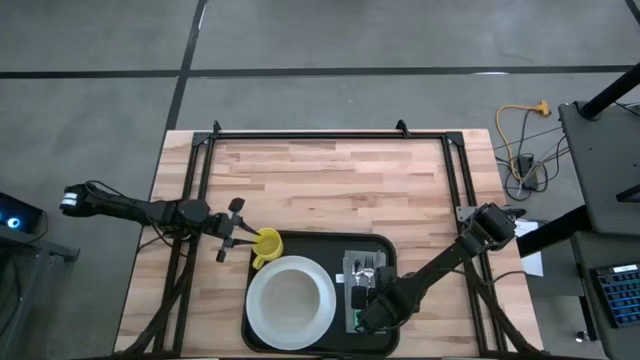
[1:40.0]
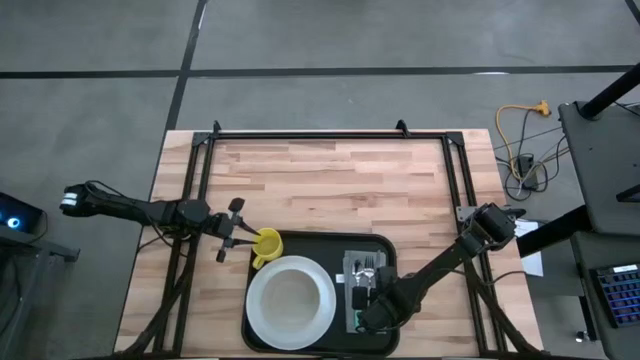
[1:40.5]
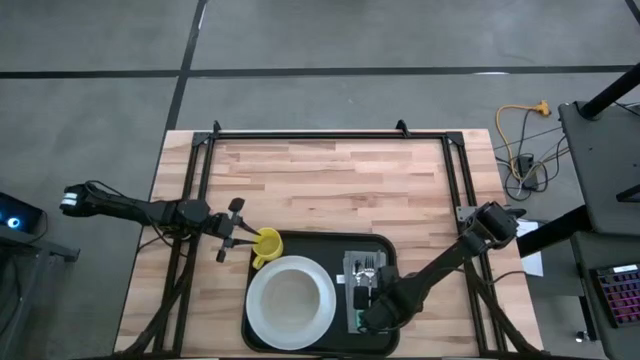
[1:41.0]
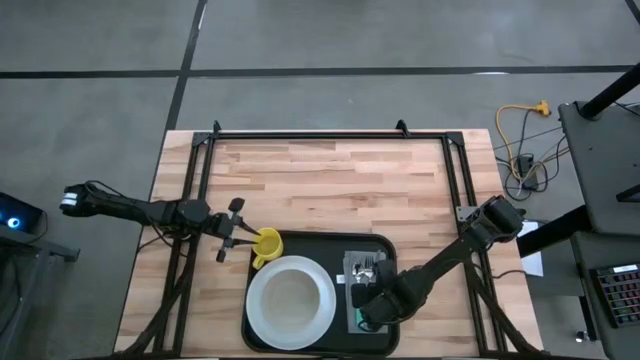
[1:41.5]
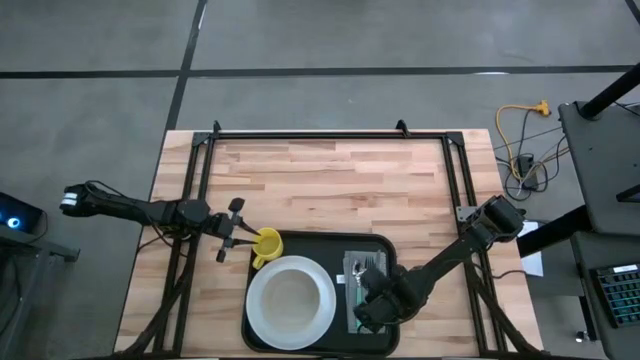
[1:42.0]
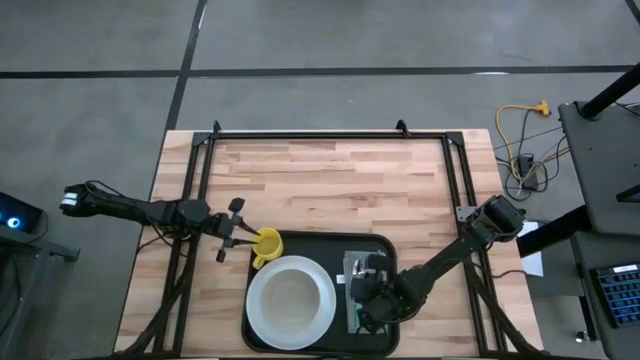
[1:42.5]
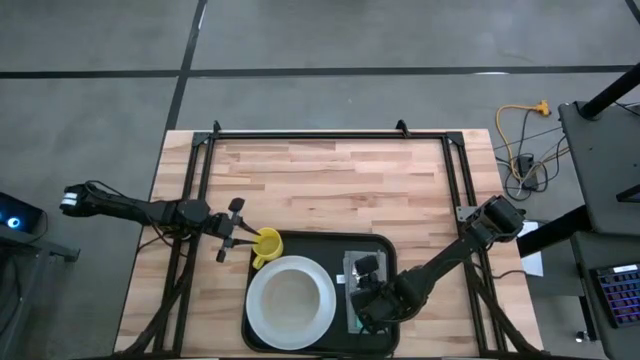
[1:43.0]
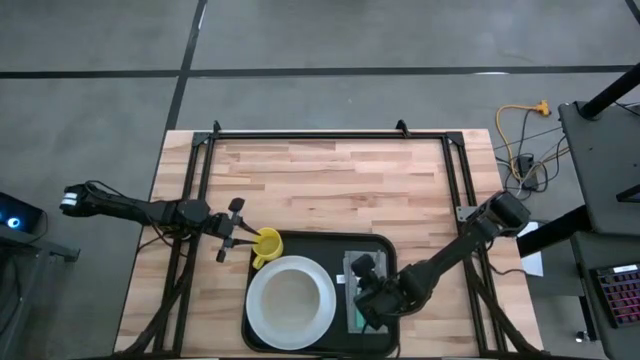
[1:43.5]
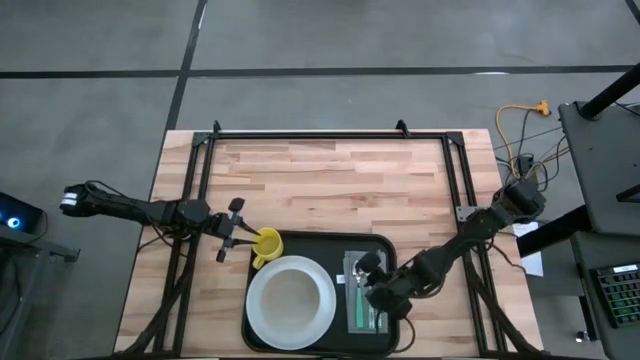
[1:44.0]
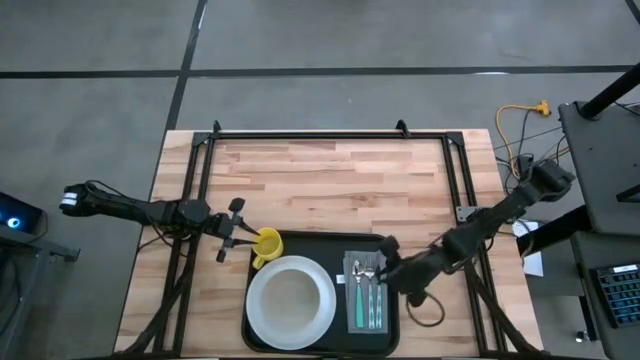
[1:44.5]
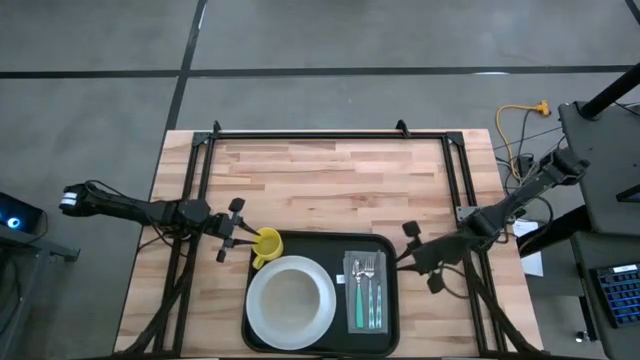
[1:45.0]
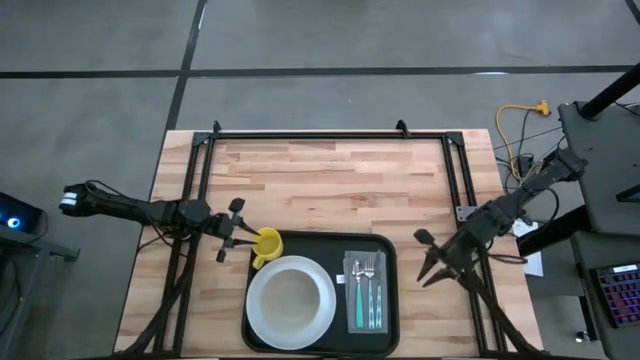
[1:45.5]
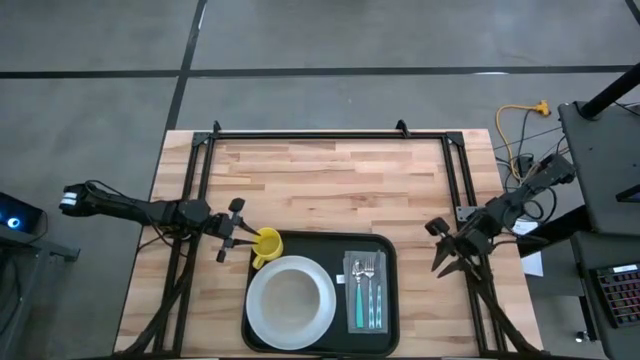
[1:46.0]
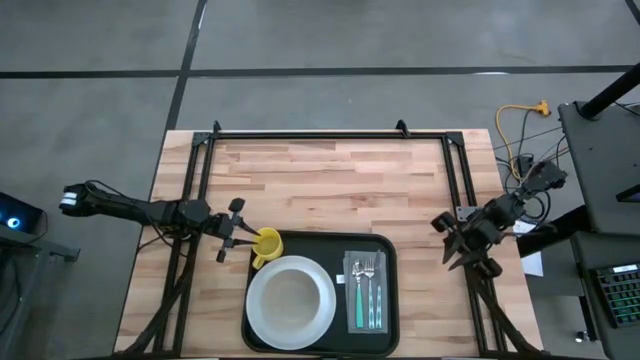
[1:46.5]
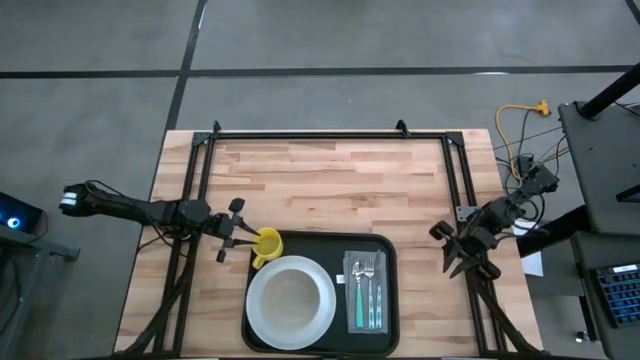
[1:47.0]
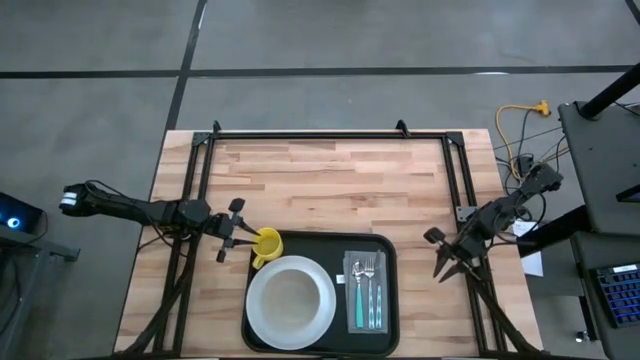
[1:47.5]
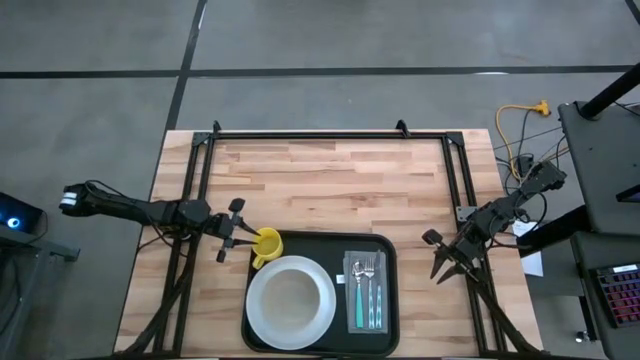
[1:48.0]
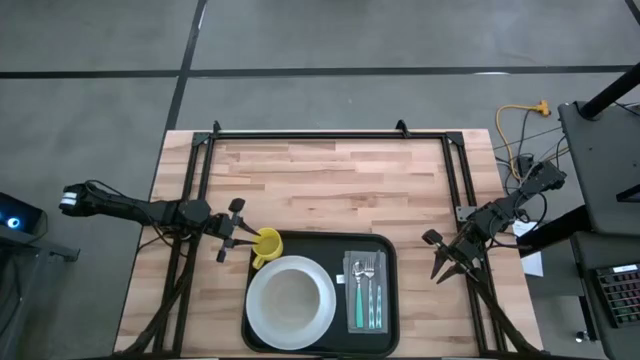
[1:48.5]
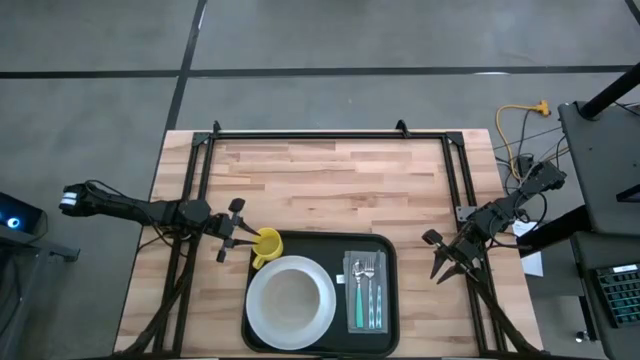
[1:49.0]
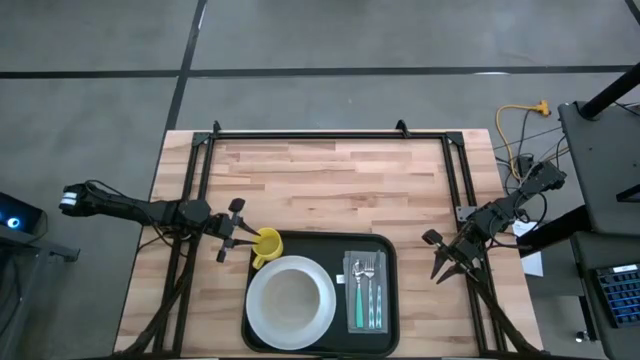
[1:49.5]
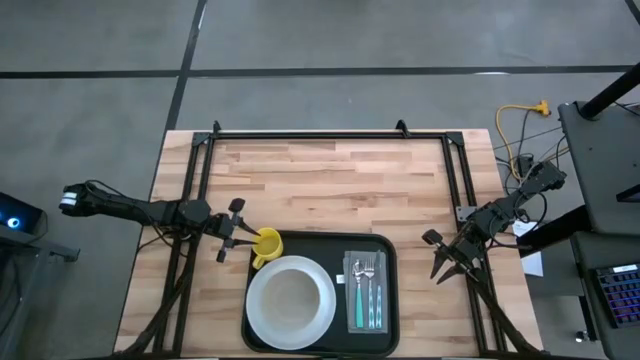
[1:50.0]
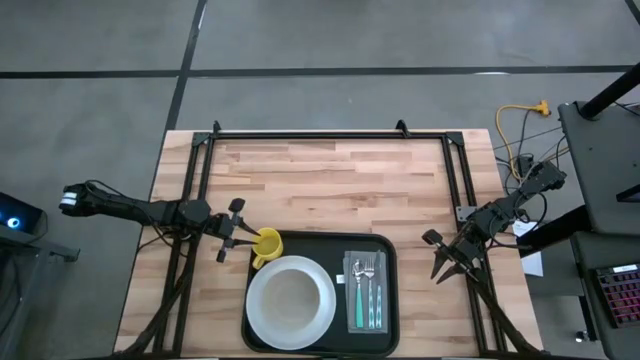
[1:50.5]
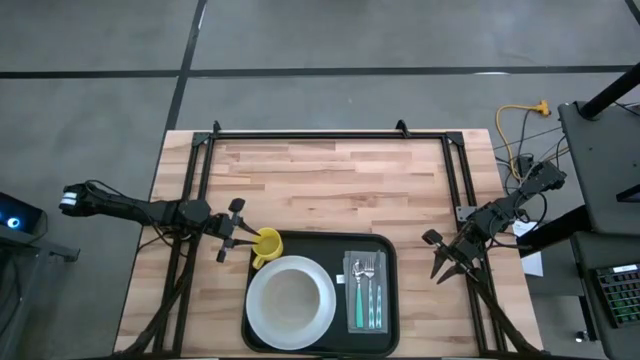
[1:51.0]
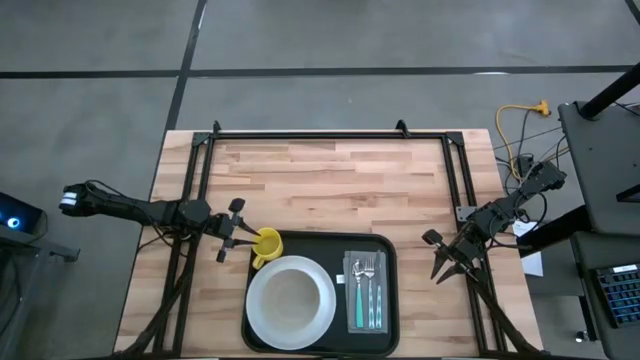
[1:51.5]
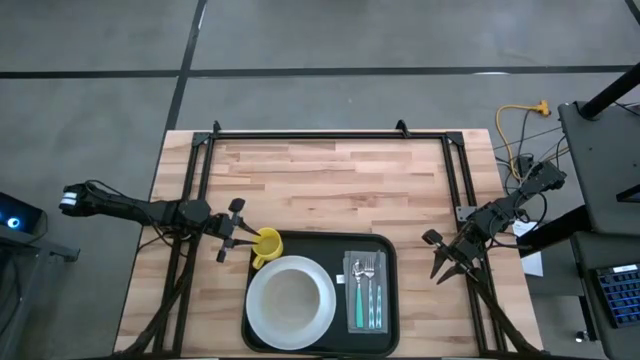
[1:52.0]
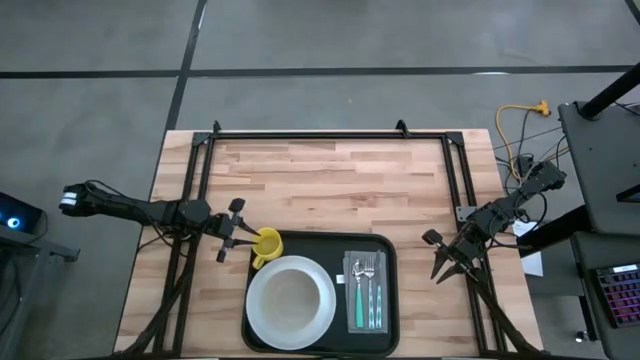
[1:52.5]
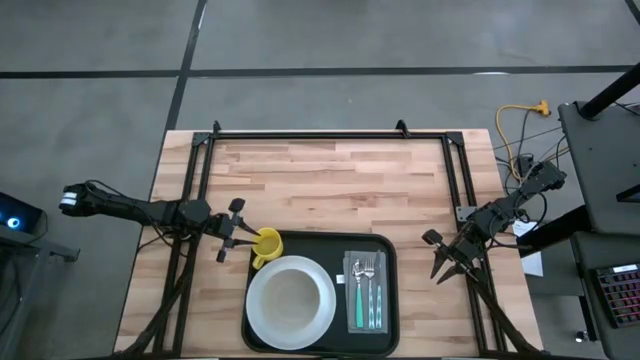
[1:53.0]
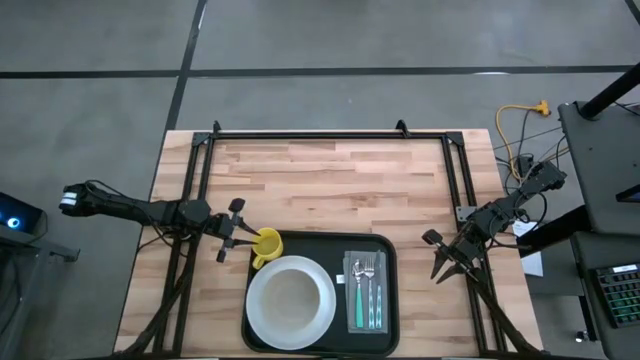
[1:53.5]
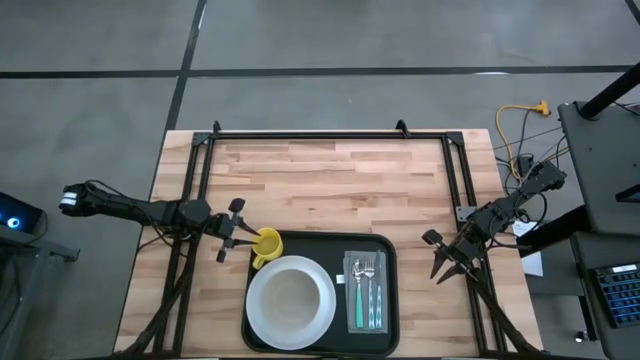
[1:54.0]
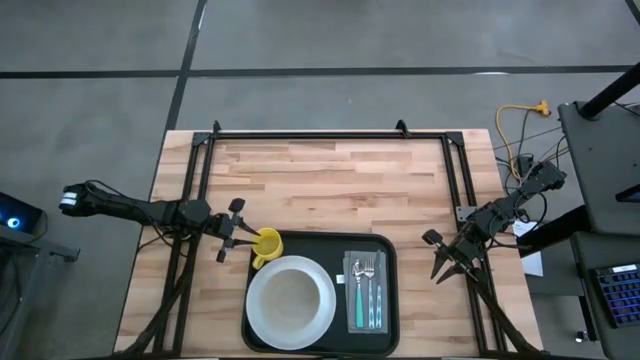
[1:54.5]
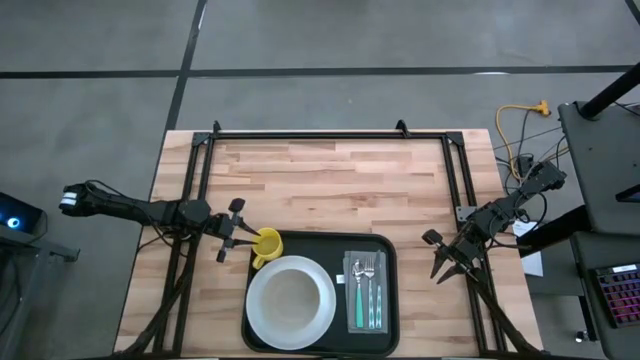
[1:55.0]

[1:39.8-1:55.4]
Task: Set up tray
Return to Home Position

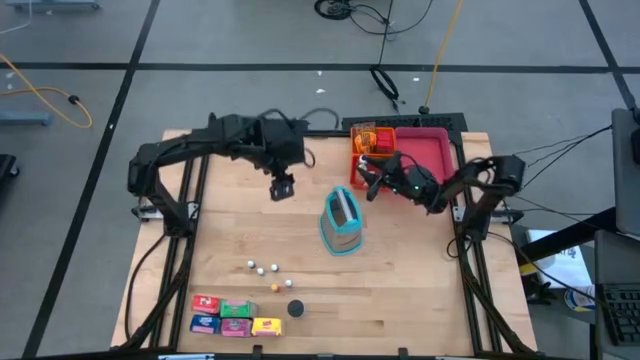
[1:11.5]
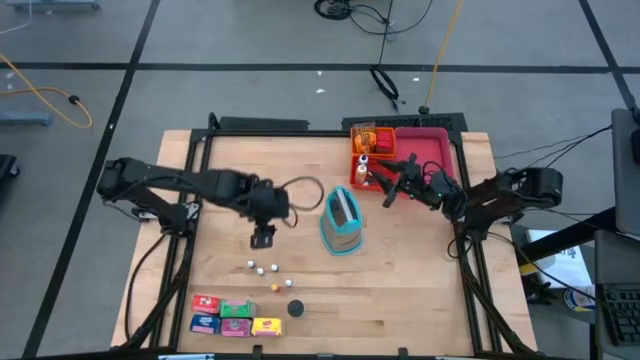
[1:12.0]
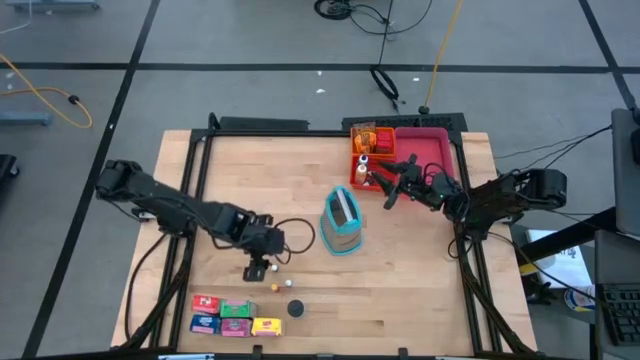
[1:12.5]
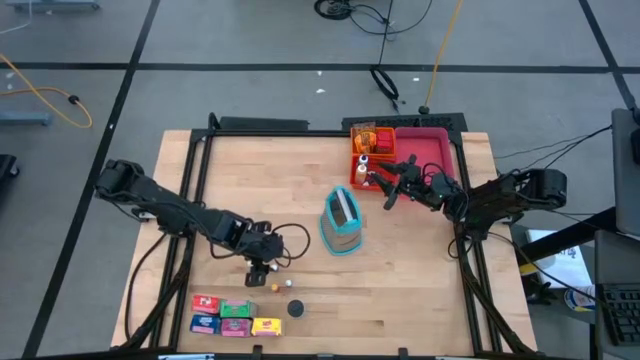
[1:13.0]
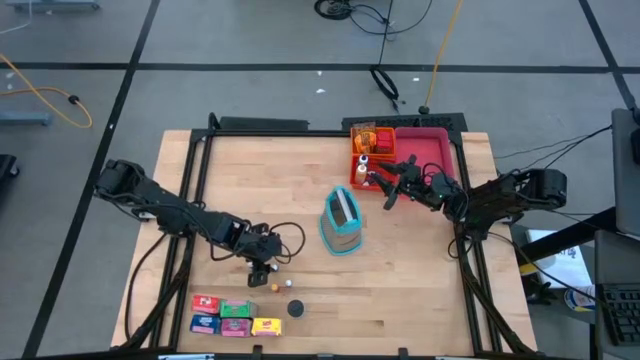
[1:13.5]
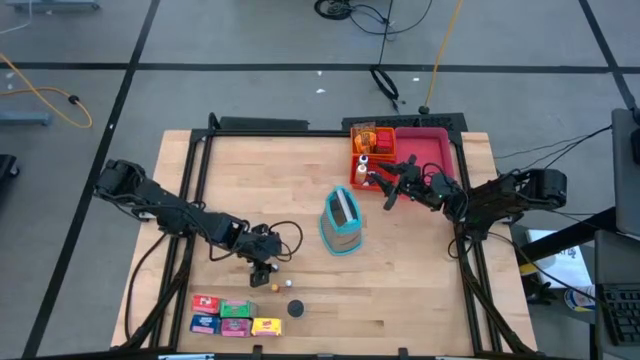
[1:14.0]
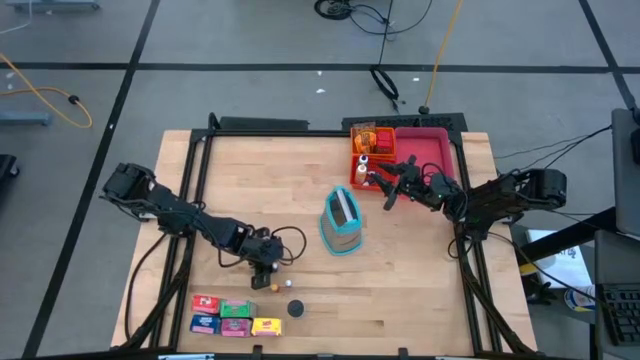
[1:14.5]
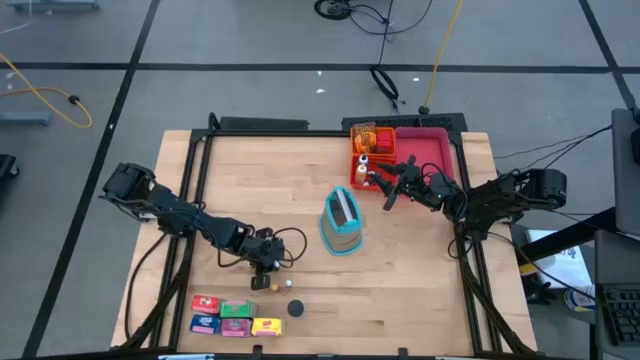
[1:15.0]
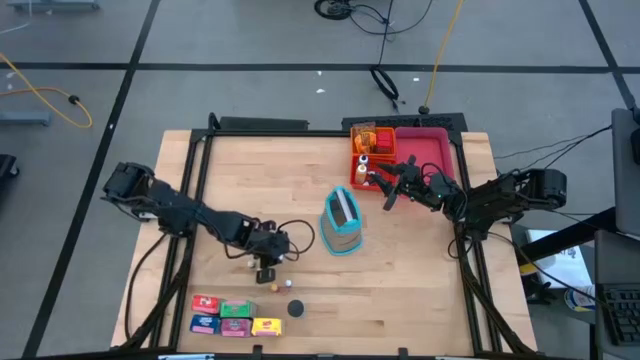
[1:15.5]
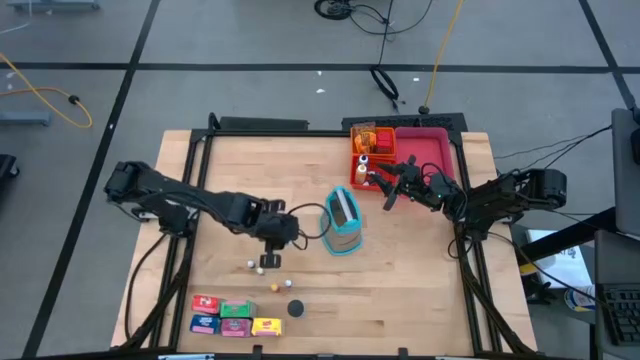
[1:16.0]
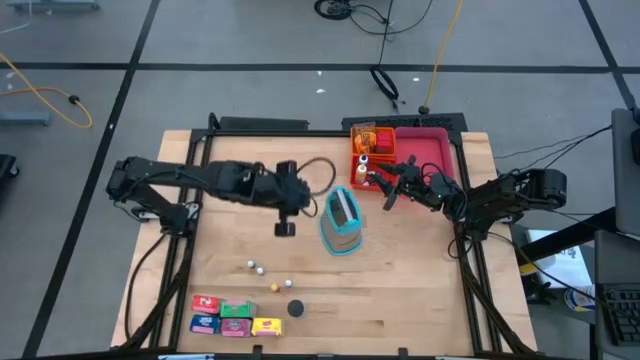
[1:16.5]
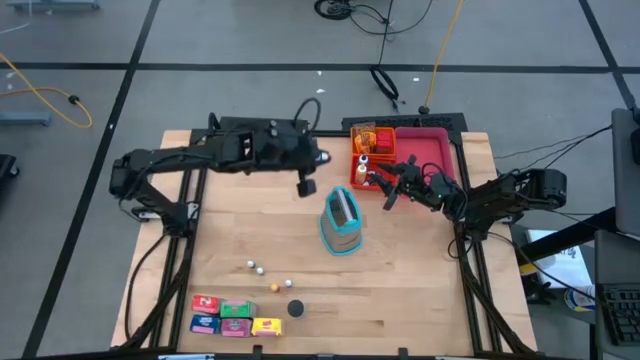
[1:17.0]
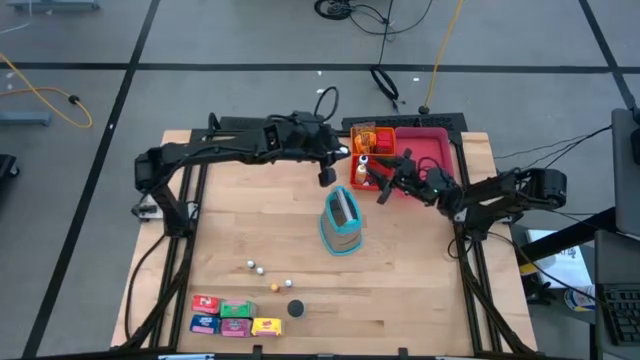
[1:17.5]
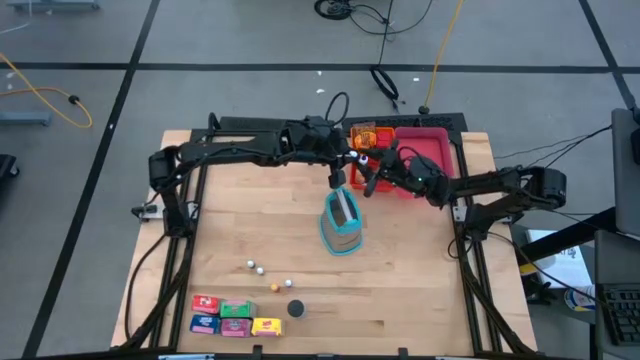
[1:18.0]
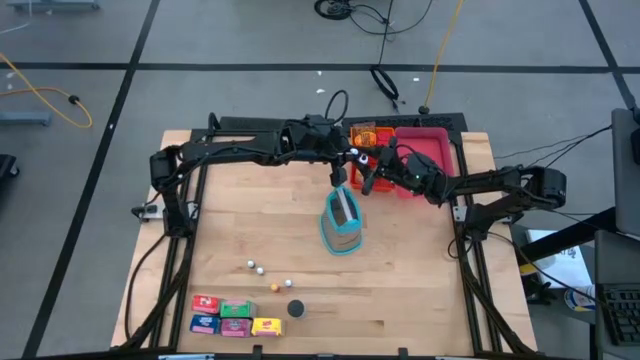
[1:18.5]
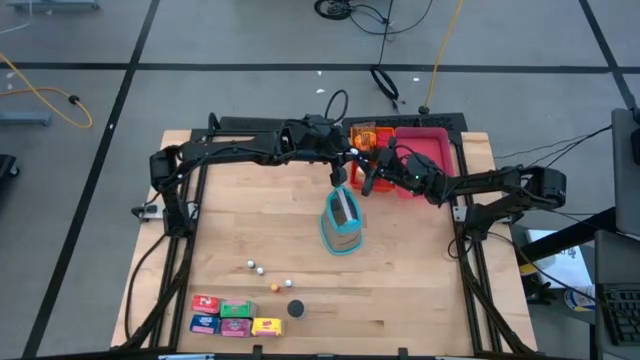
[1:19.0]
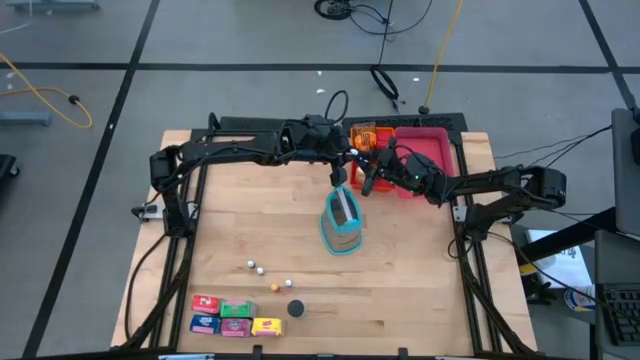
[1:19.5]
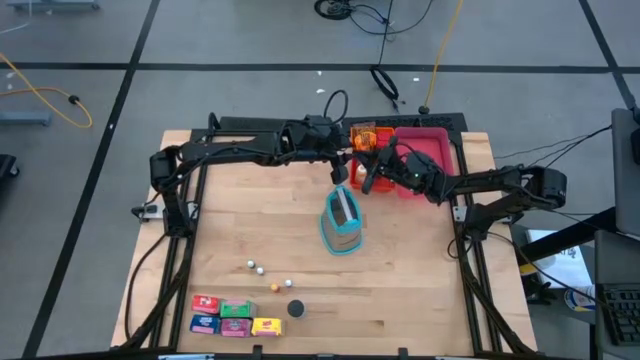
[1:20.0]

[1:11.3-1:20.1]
Task: Pick & Place Kitchen Items
Put the small orange food coloring bottle into the red bin
